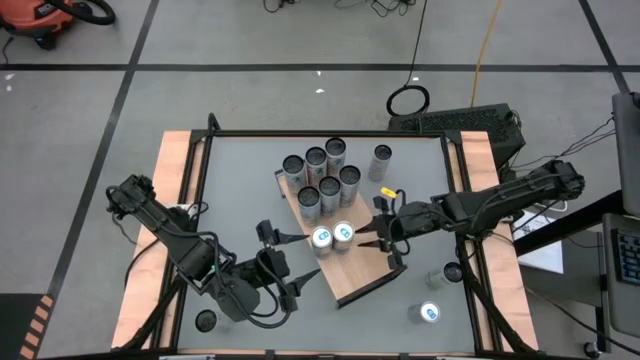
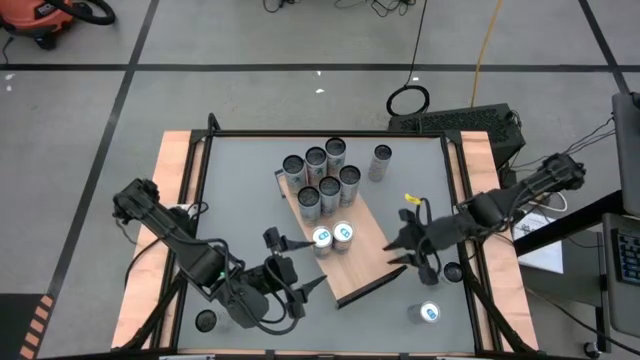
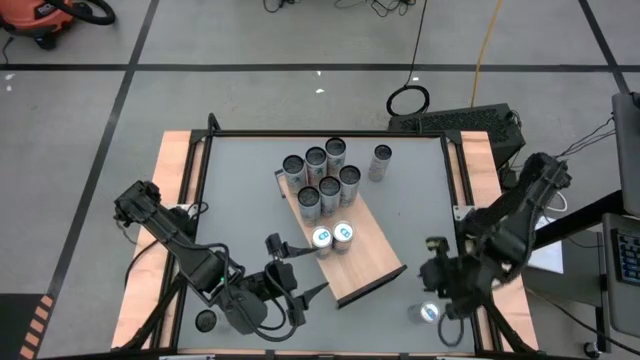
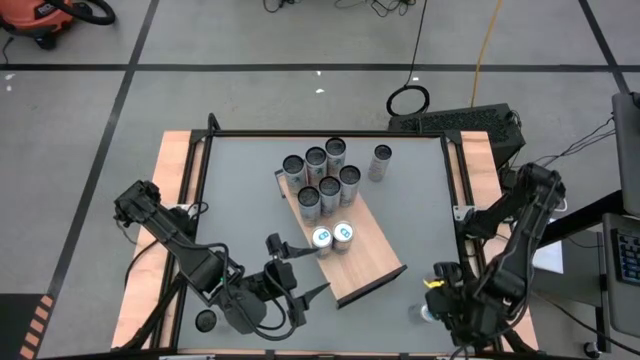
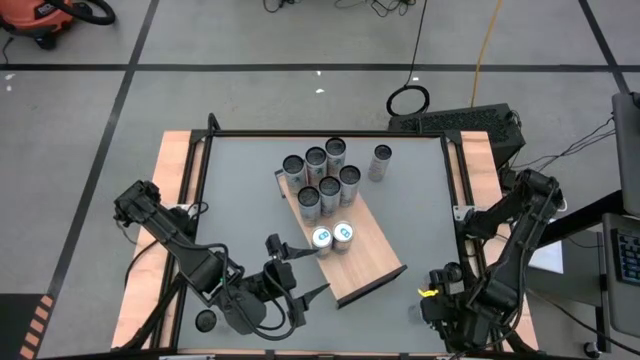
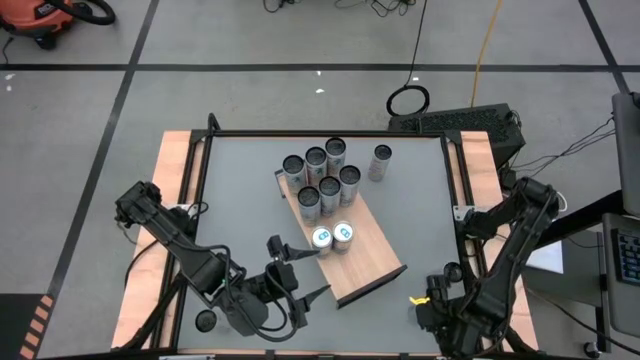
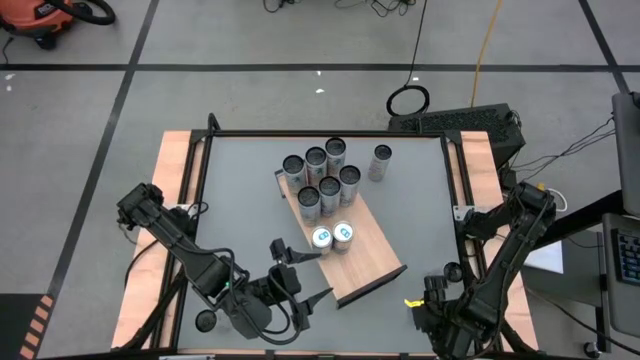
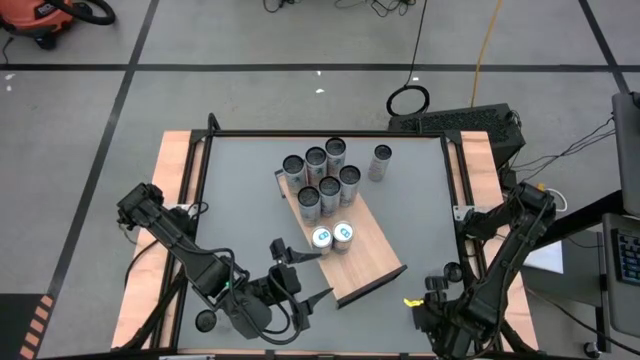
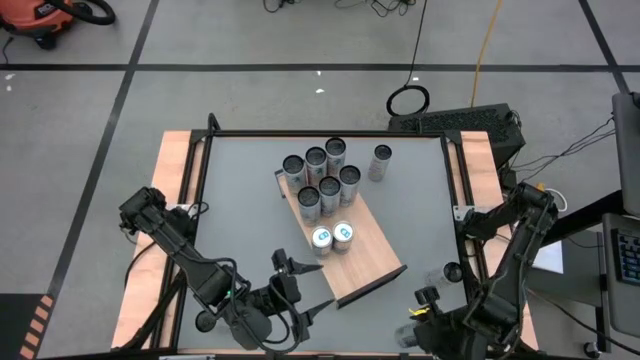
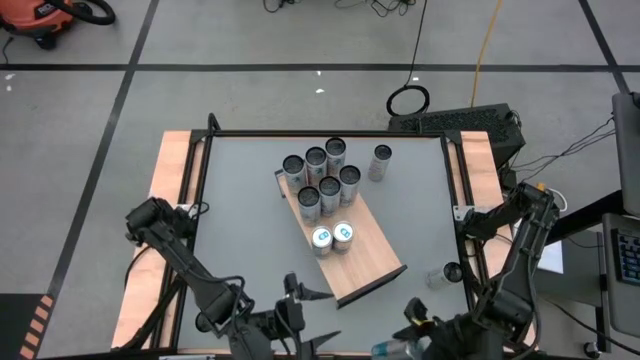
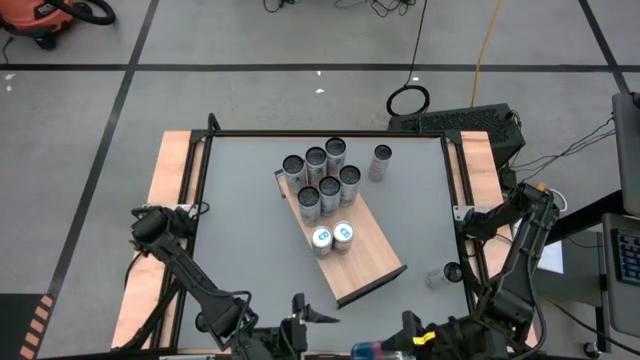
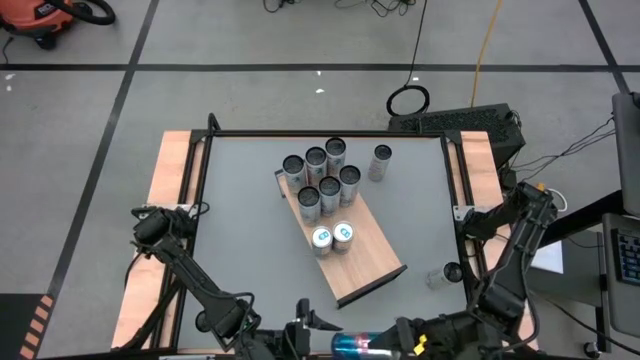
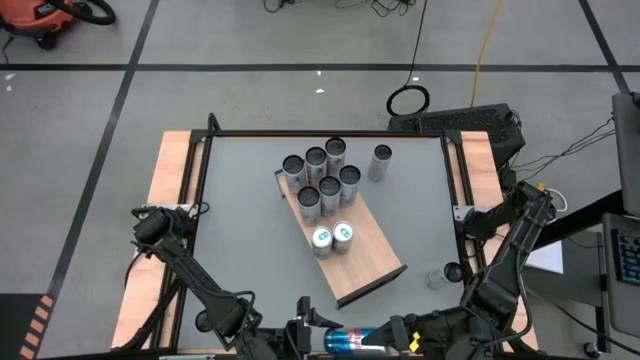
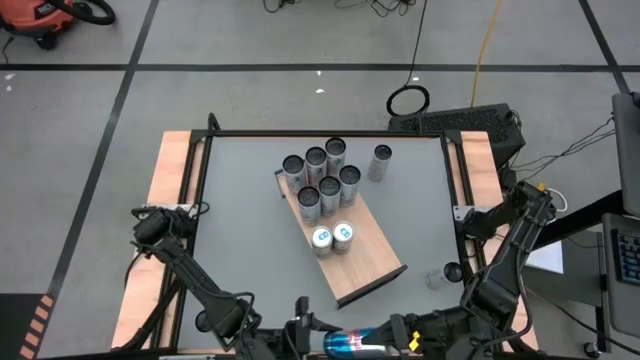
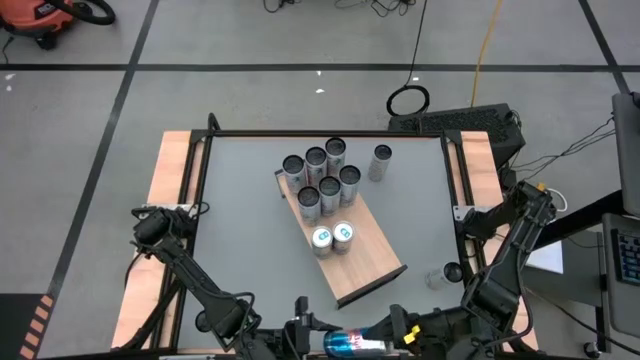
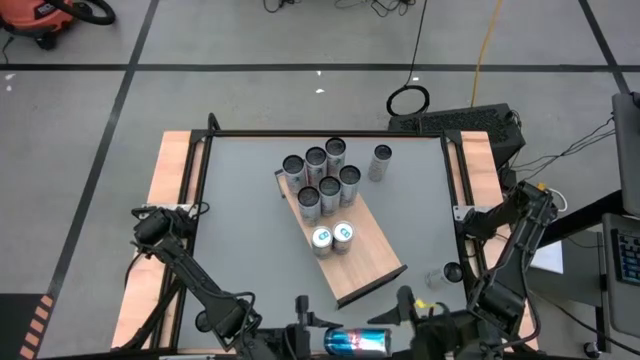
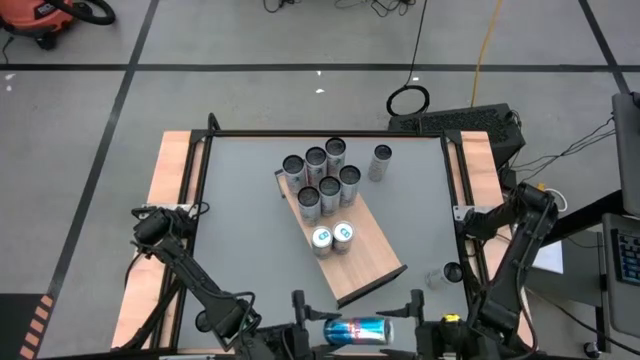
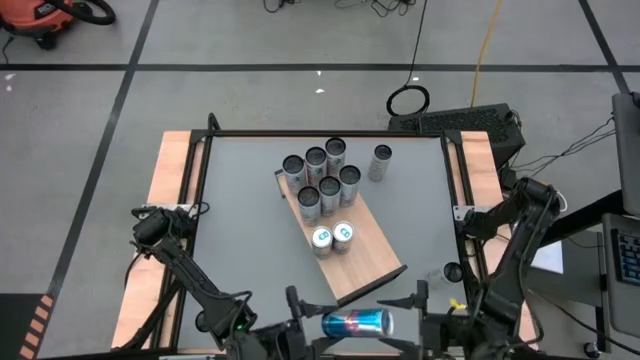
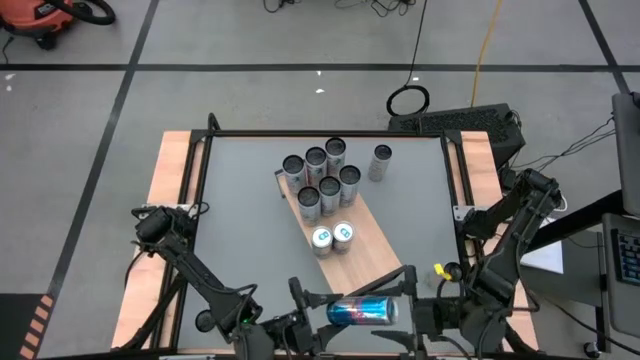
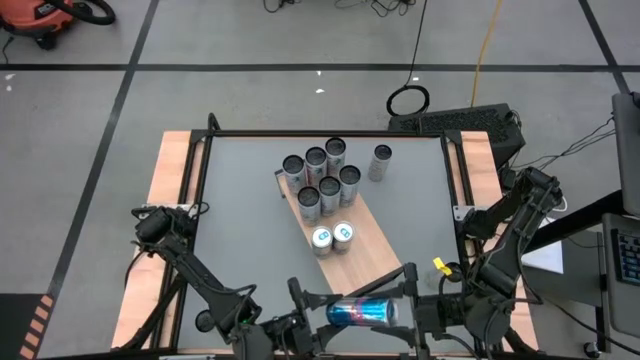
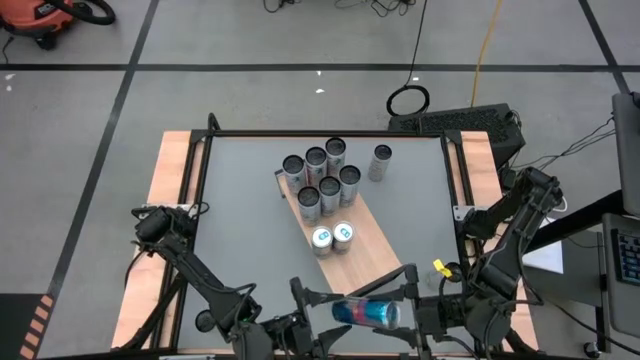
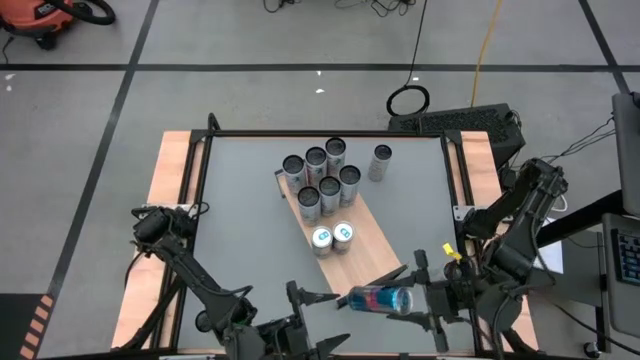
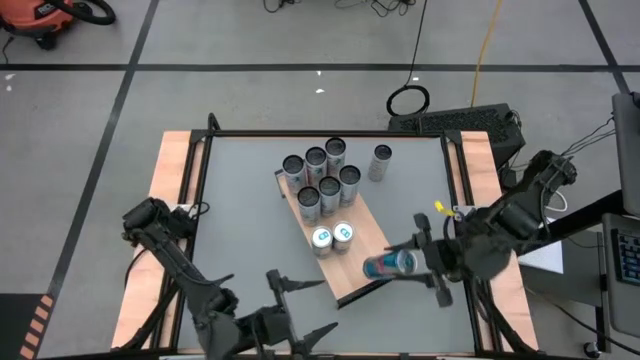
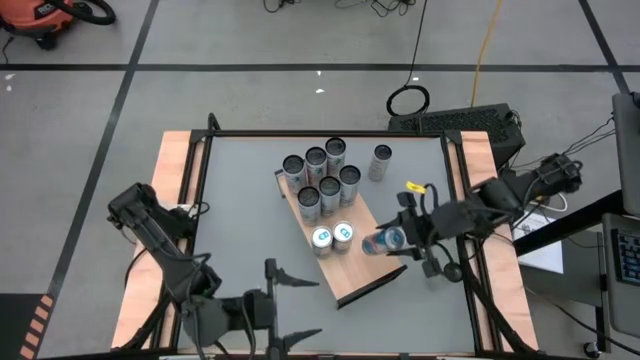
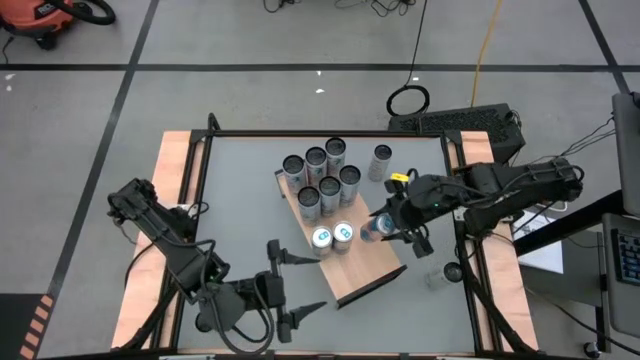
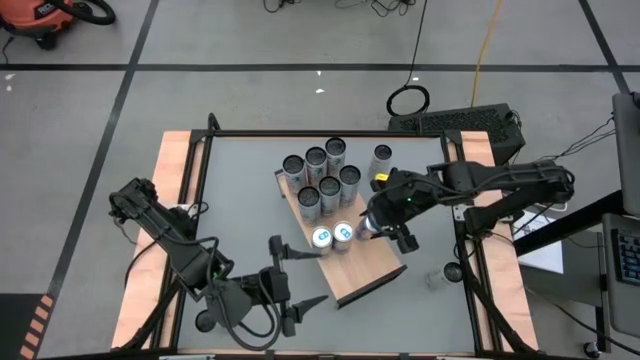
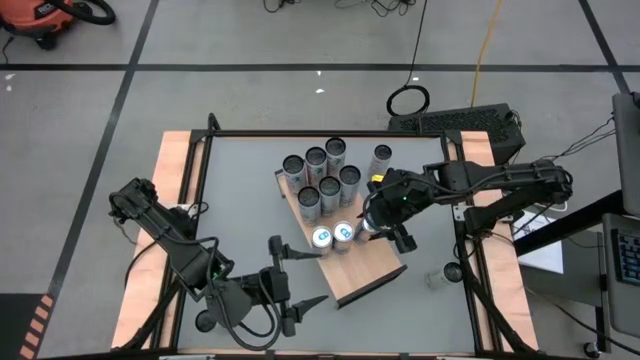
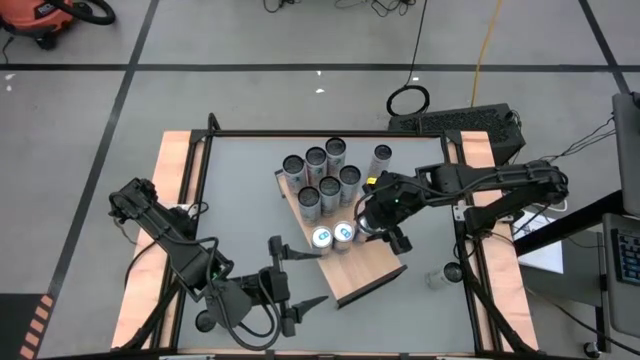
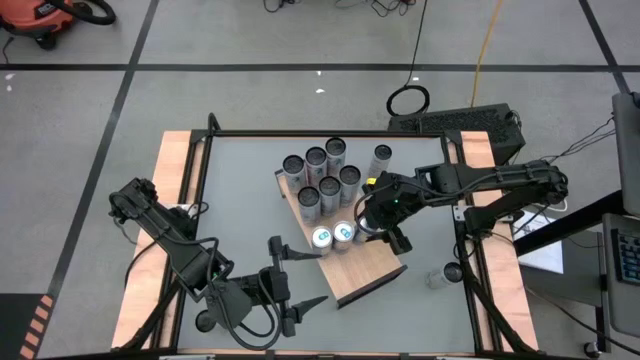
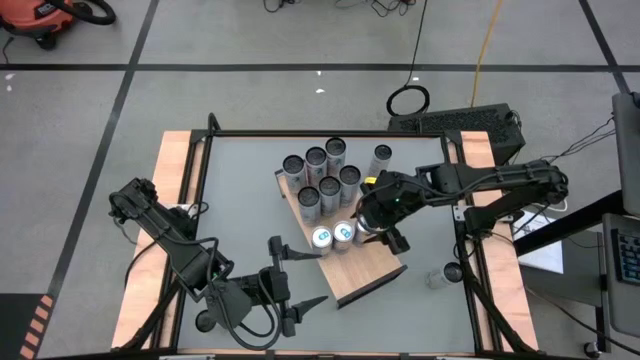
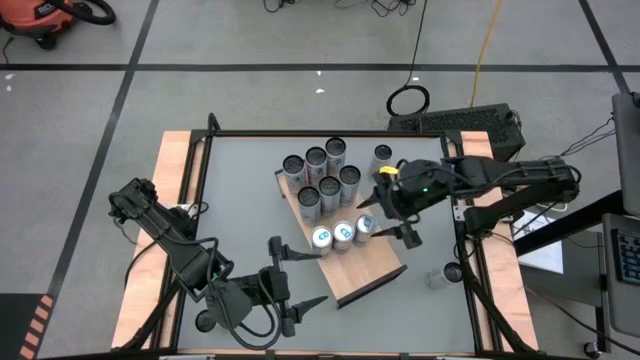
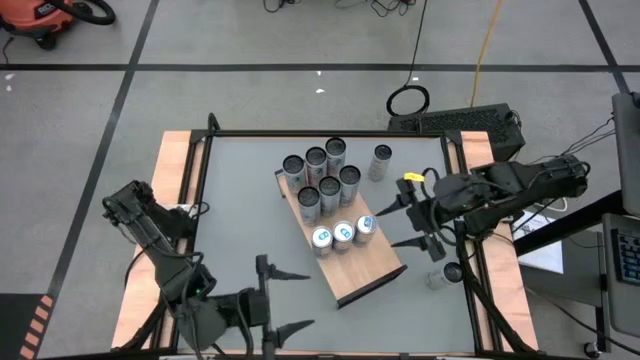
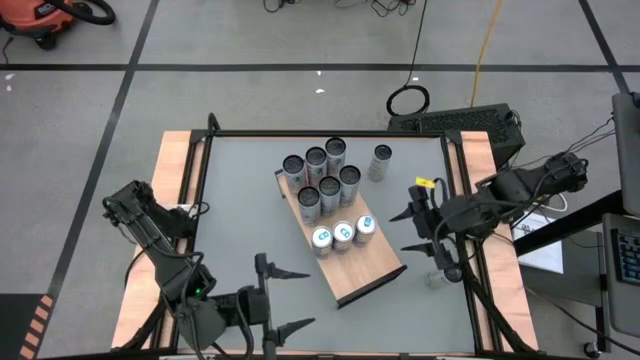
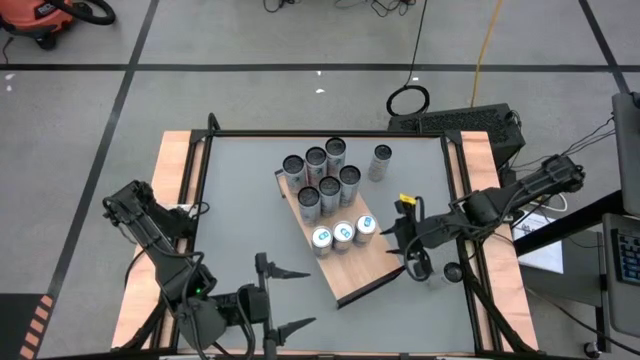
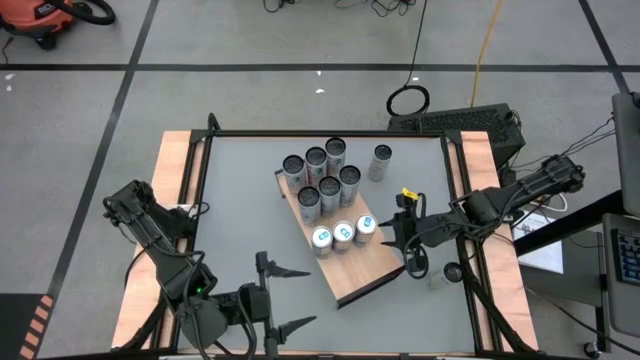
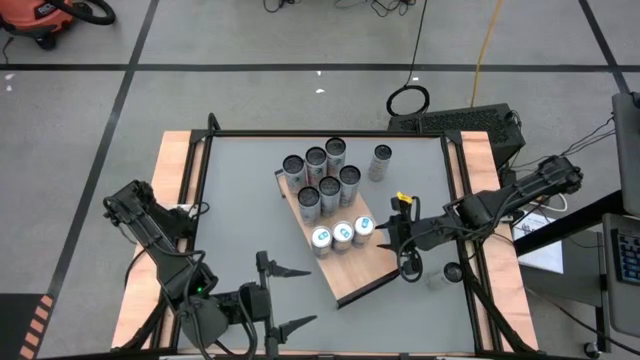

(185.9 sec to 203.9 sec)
Task: Place canned beverage on shelf
Put the blue soda can on the shelf aligned with the other blue soda cans

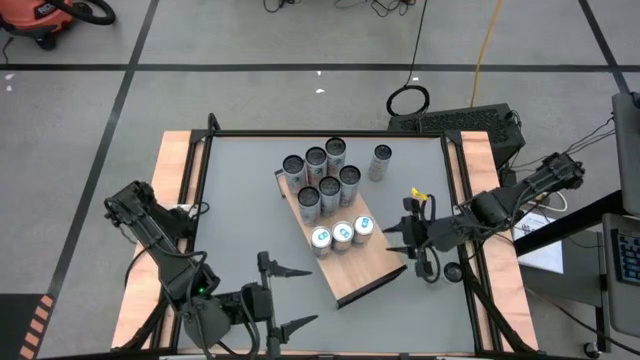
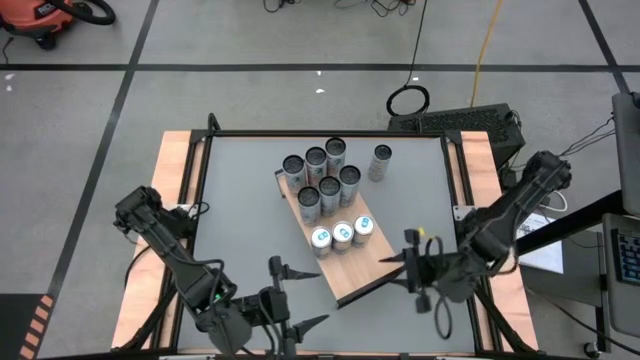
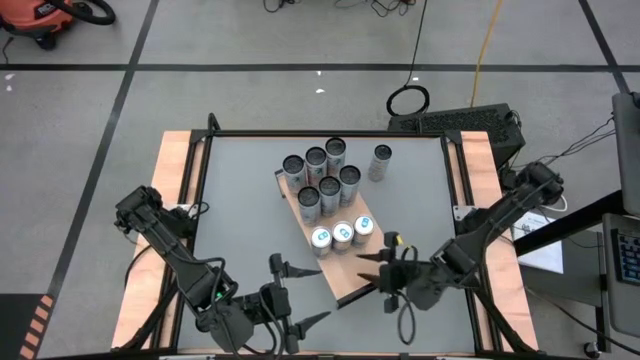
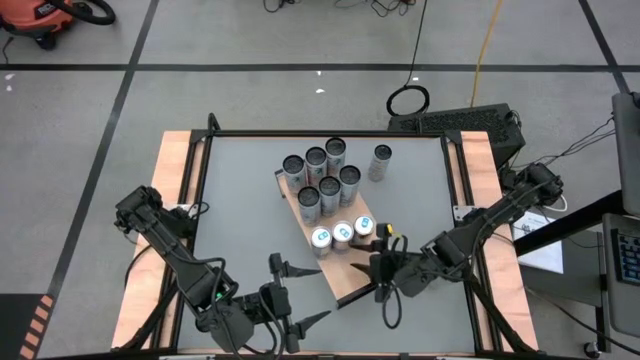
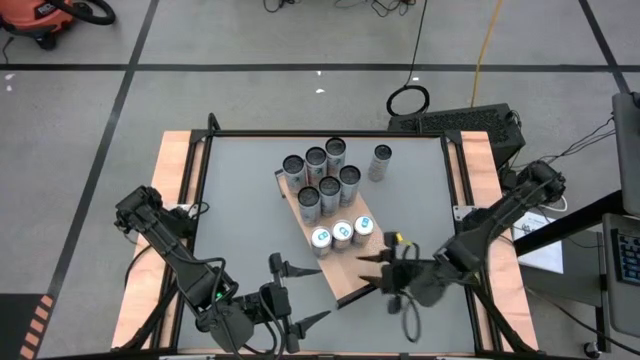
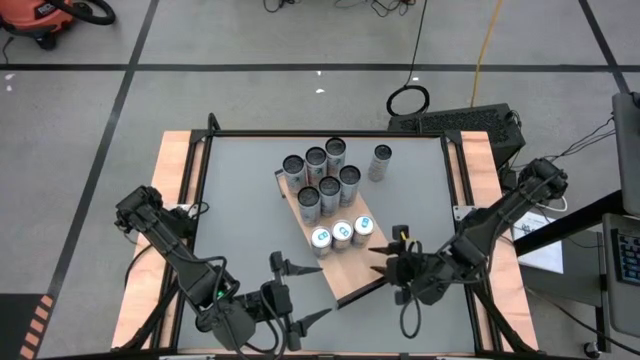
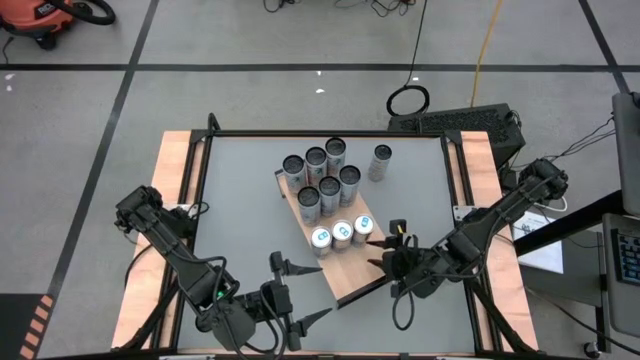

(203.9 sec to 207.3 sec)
Adjust the blue soda cans on the shelf
